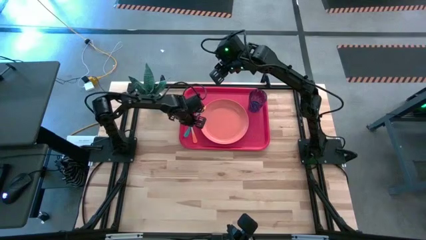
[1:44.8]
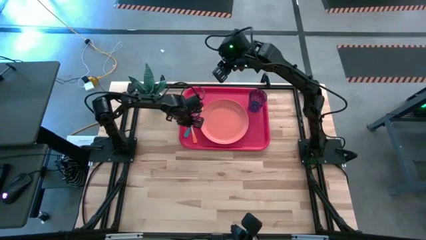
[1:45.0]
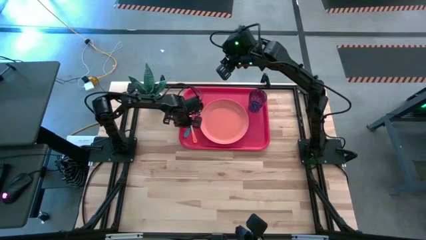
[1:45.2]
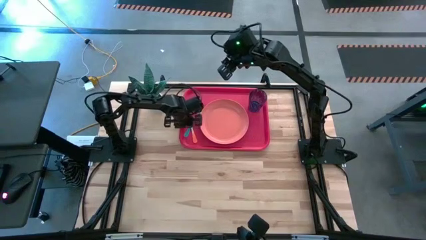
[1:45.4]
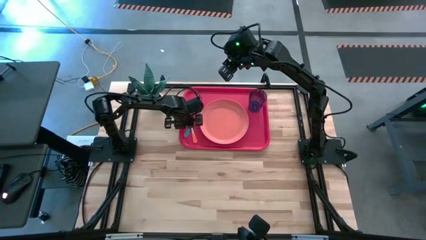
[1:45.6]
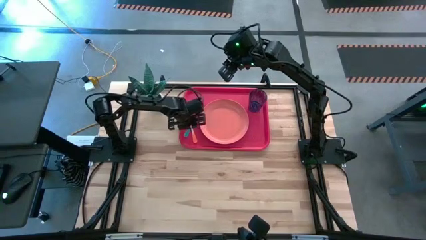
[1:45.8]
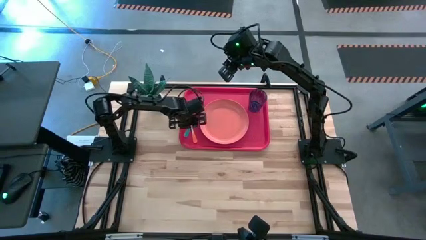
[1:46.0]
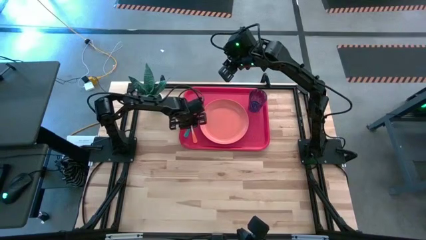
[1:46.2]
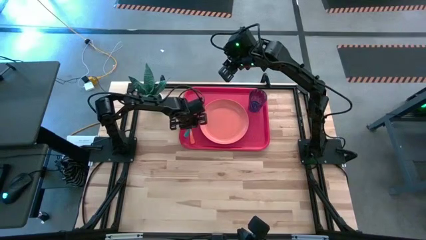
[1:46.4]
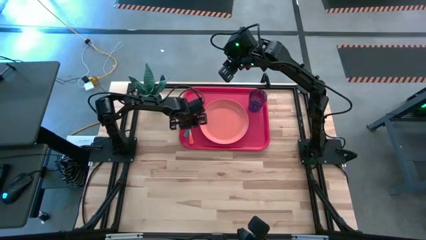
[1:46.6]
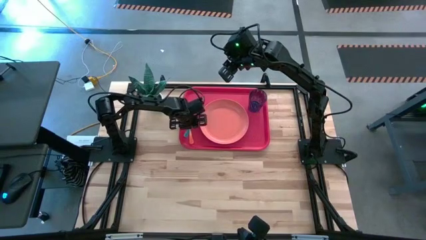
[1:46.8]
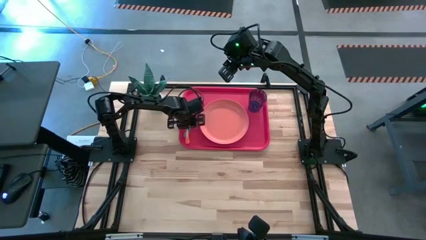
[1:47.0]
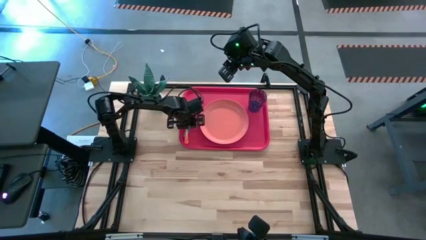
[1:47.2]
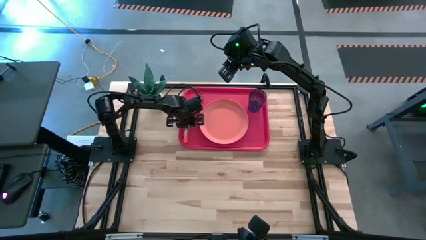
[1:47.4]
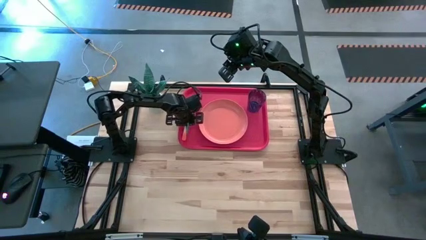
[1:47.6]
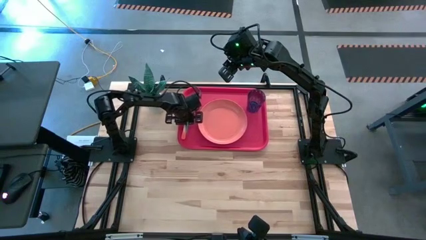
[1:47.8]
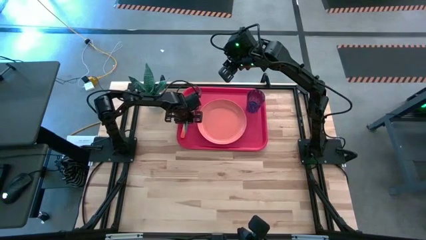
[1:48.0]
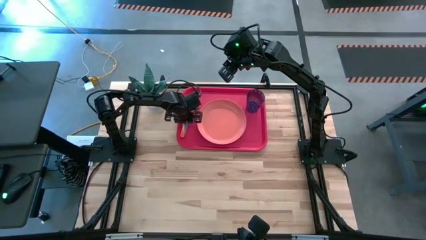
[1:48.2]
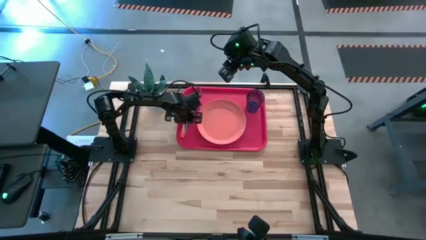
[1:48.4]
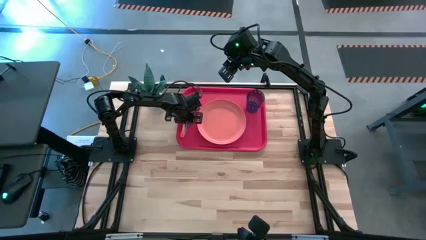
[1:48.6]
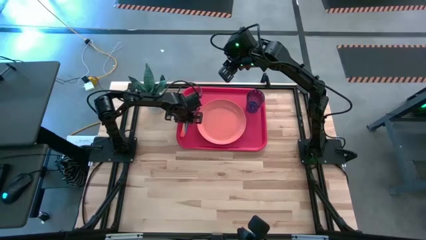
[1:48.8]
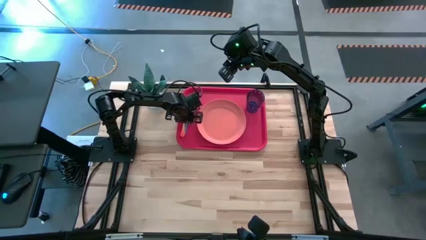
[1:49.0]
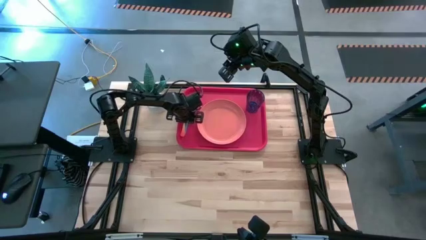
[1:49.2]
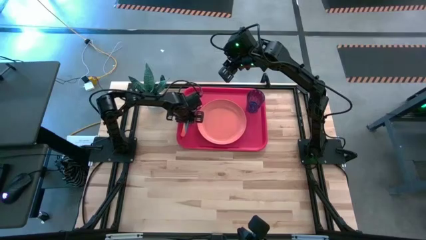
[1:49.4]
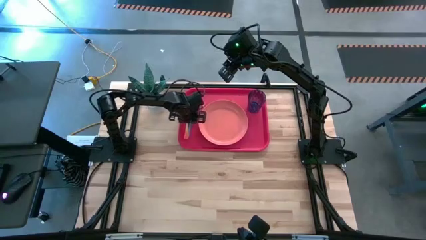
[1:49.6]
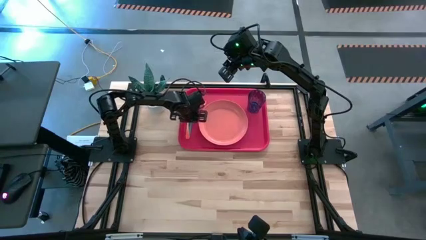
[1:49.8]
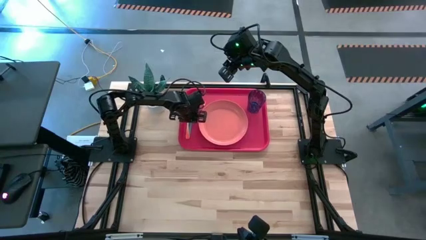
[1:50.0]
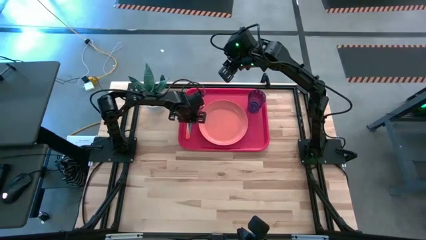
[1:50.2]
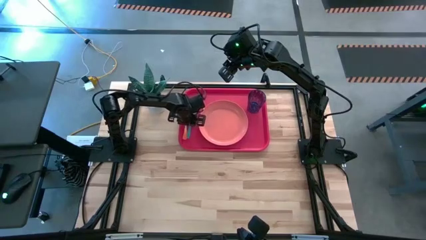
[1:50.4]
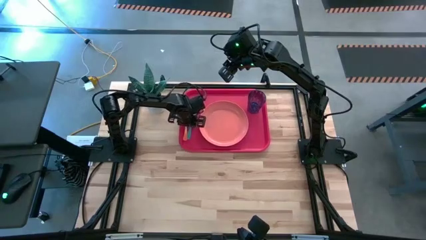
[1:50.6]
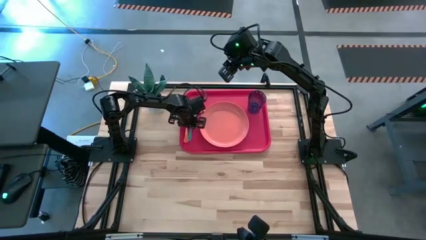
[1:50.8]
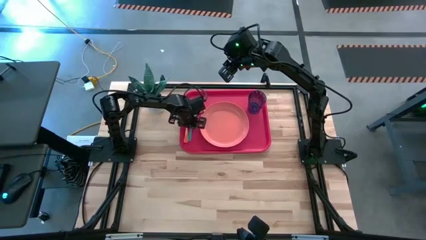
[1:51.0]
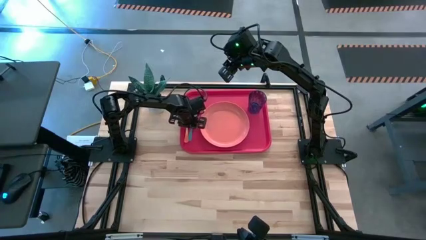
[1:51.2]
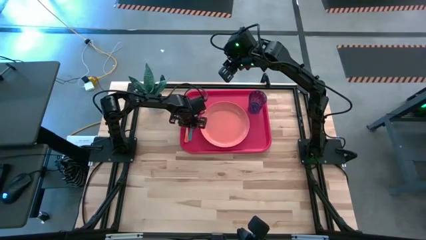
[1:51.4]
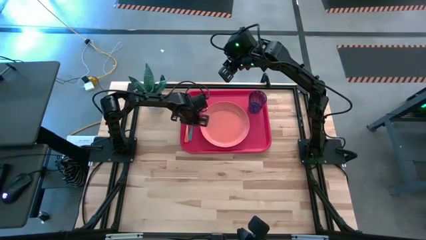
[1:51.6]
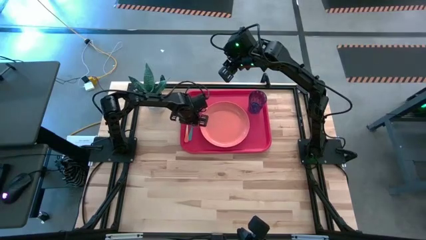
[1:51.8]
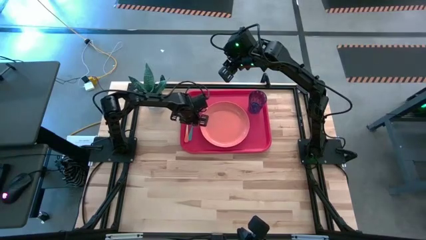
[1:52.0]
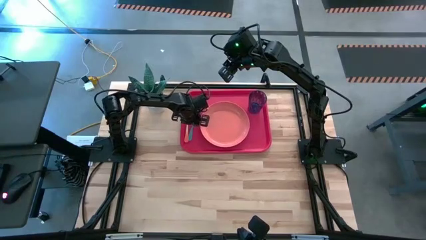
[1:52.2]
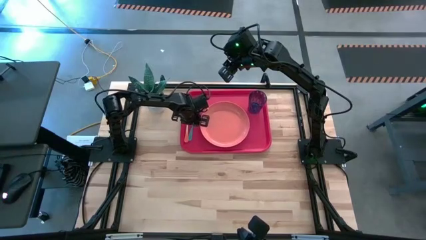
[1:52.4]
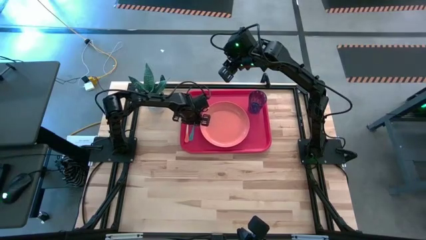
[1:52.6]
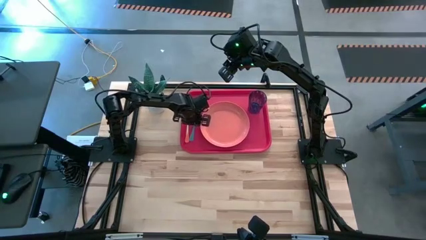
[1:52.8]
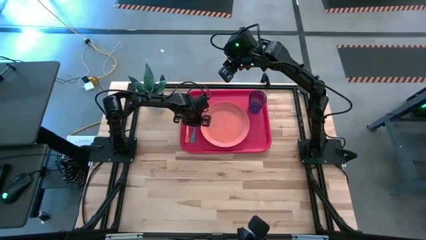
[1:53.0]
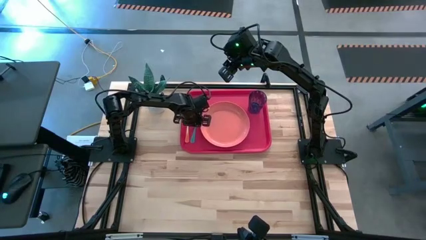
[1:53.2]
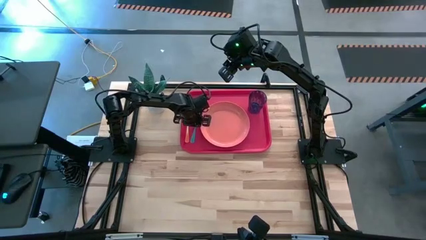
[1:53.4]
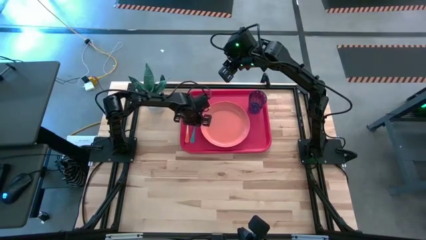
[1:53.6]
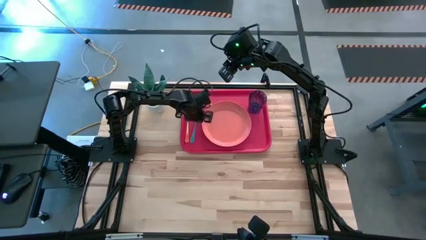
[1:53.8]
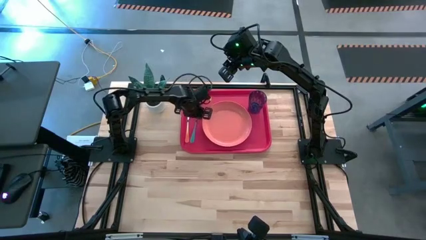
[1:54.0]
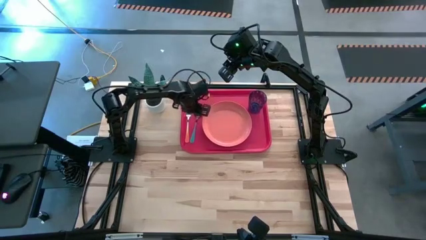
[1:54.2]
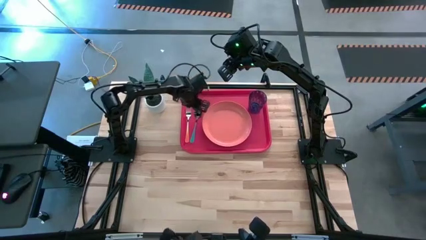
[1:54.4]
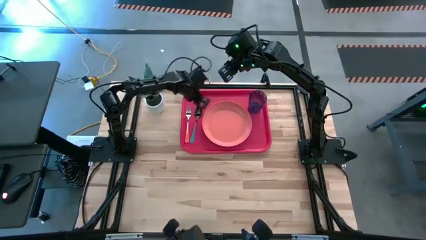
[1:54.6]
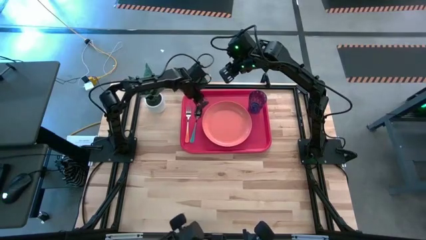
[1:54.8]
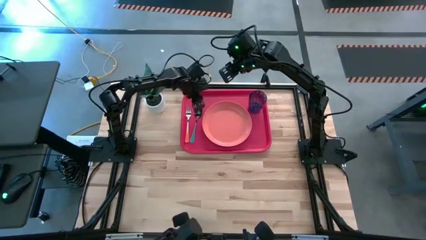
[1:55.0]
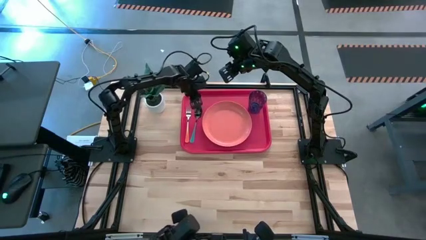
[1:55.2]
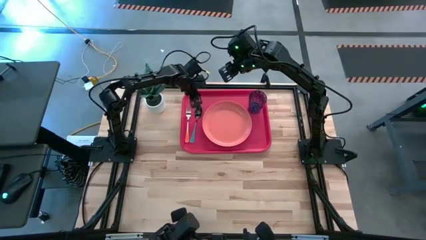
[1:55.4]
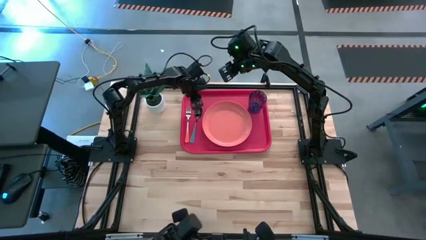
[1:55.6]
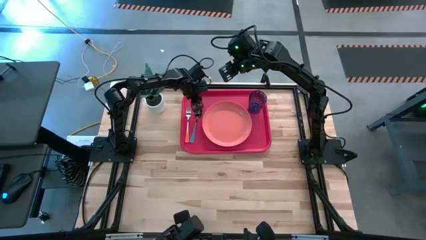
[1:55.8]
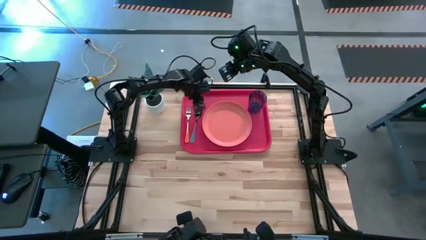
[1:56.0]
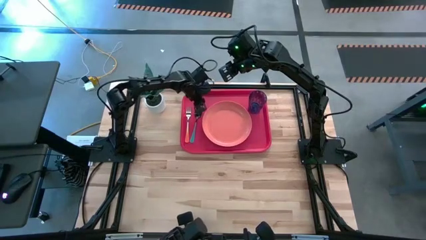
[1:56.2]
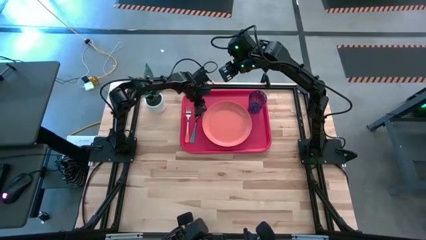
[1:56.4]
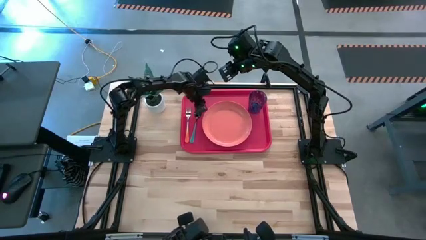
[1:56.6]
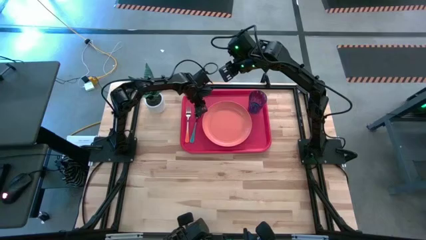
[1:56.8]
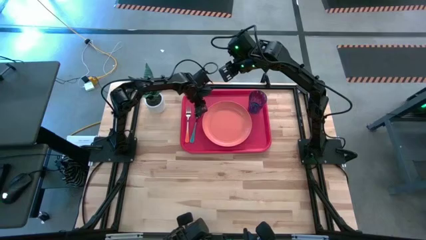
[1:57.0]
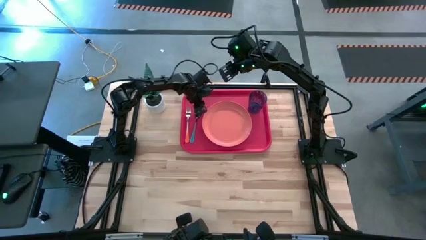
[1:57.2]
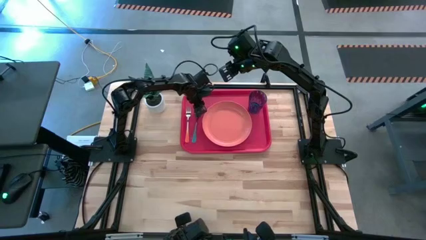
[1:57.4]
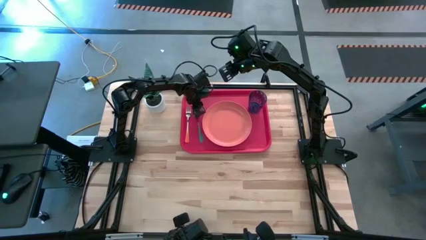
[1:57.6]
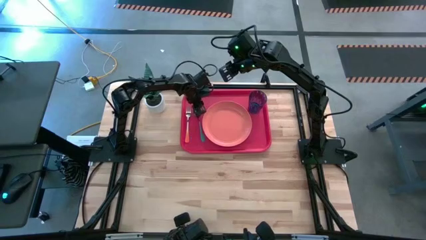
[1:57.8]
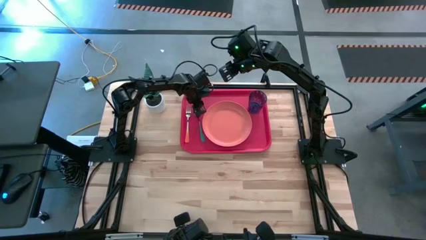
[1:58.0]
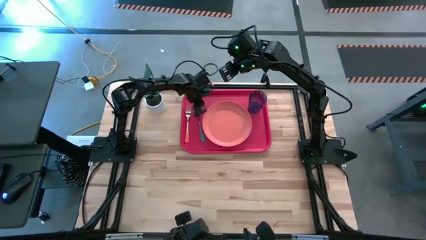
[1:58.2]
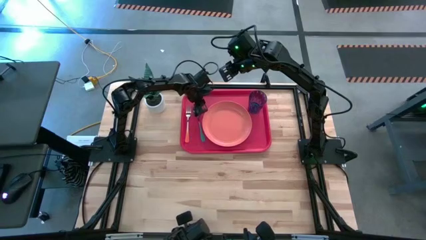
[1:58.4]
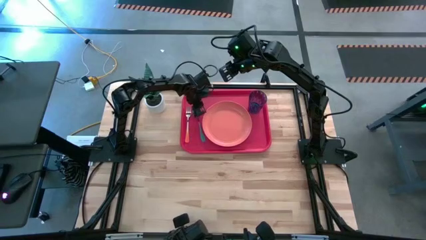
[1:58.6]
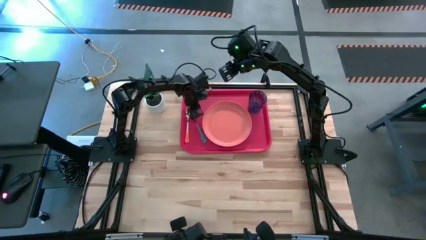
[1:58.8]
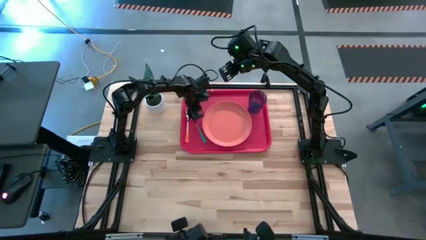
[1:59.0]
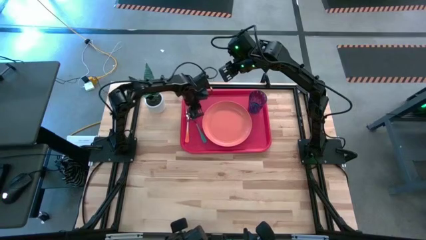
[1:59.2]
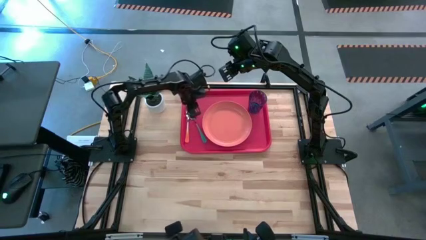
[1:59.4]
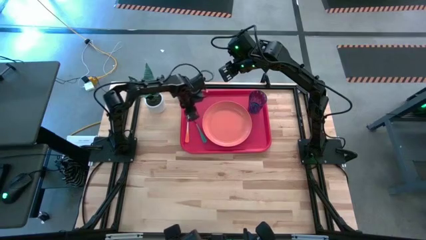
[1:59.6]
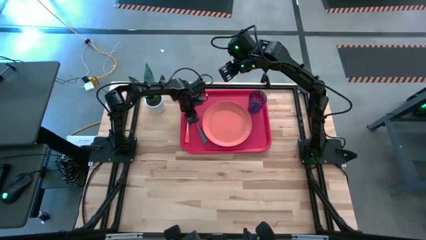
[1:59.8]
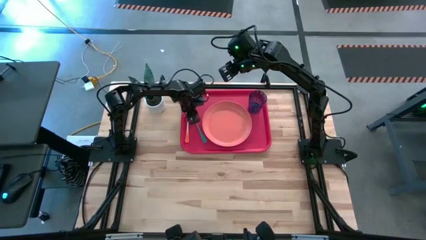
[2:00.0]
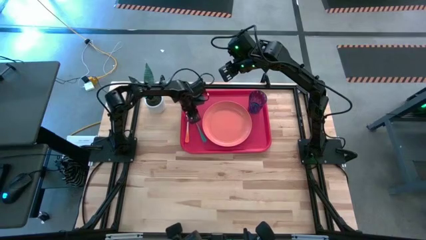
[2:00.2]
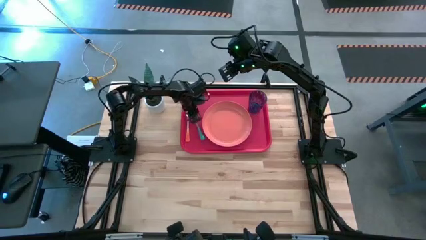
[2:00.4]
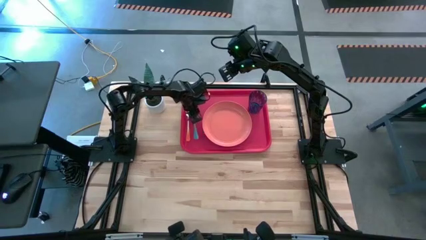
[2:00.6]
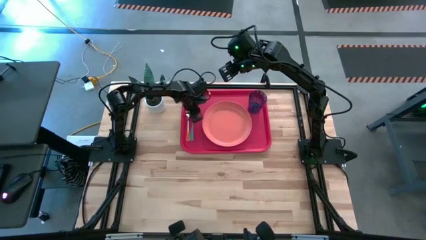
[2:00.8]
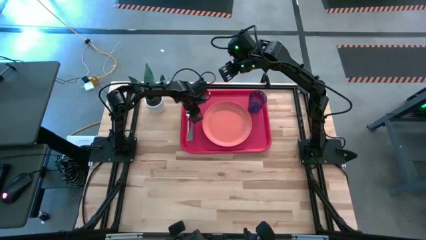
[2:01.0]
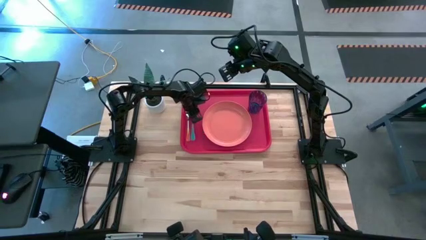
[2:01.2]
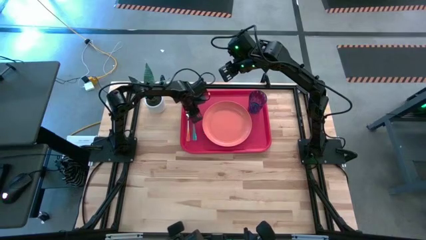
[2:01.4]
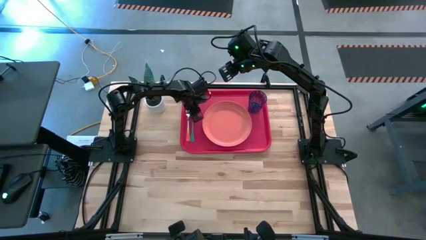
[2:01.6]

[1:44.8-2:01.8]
Task: Pick and place plate/cup/fork/spoon on tray
Adjust the utensils on the pink tray
